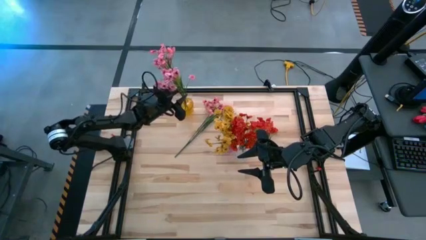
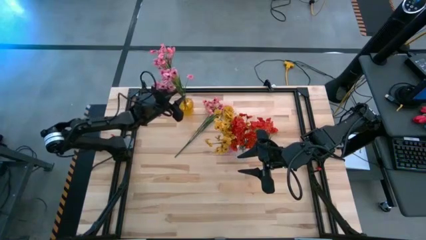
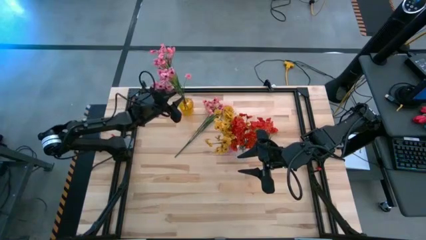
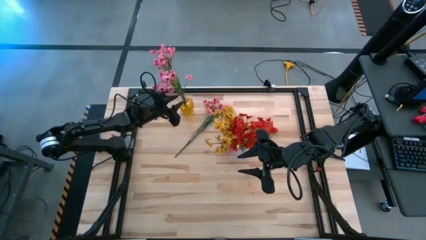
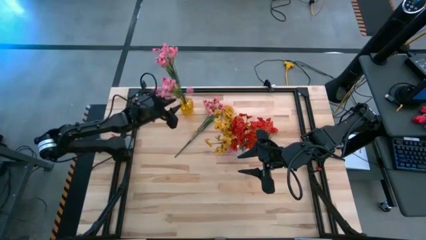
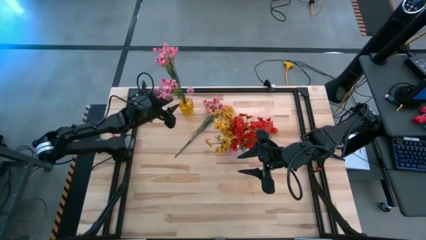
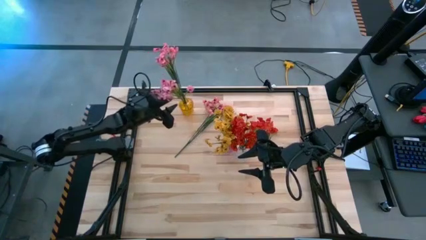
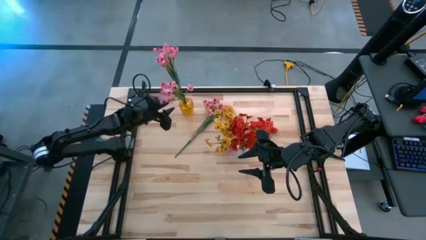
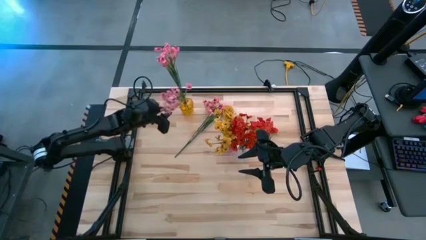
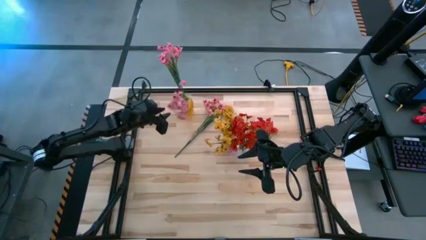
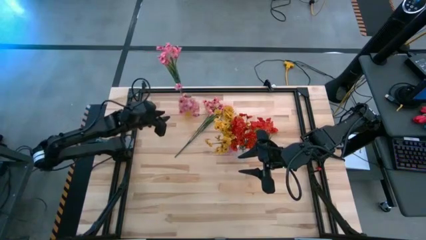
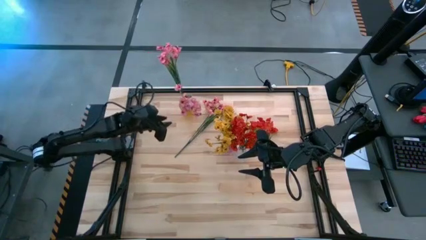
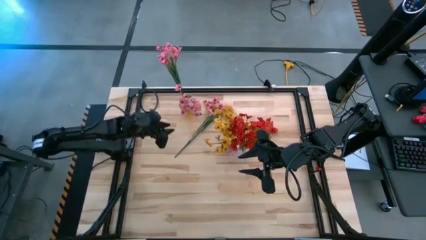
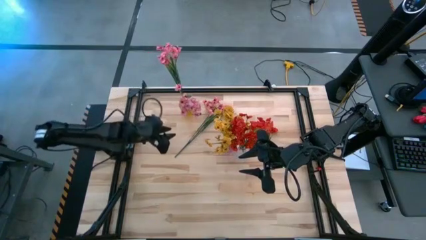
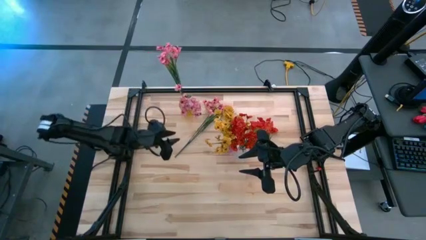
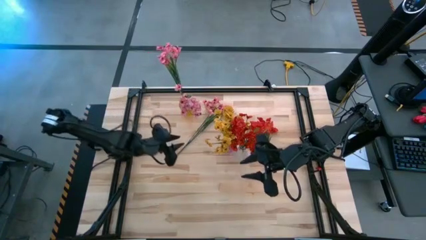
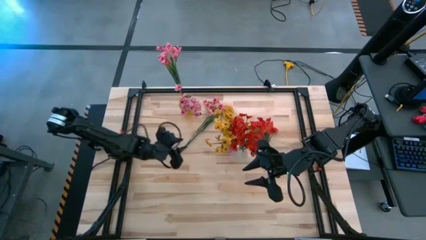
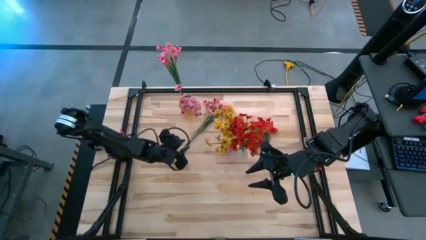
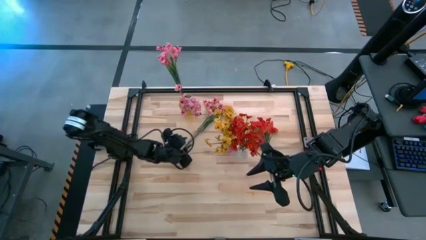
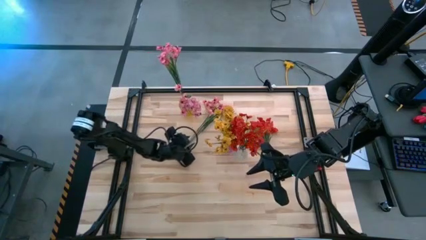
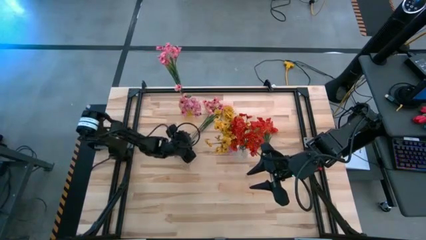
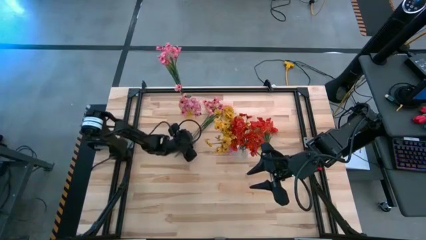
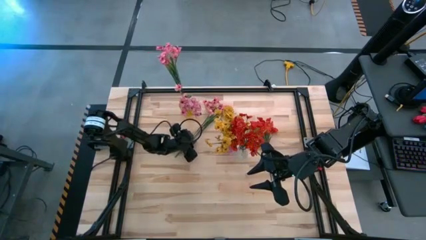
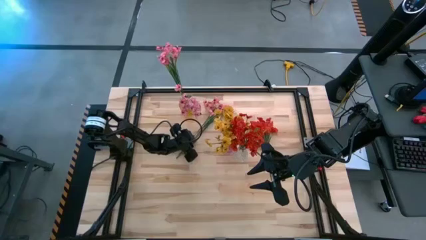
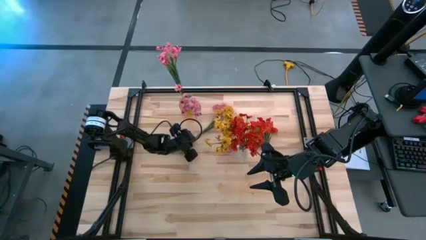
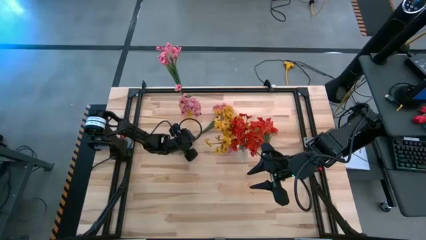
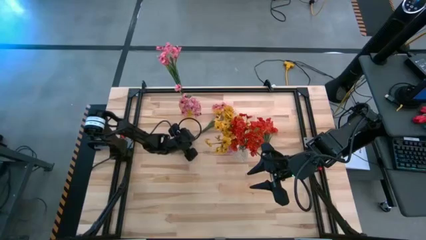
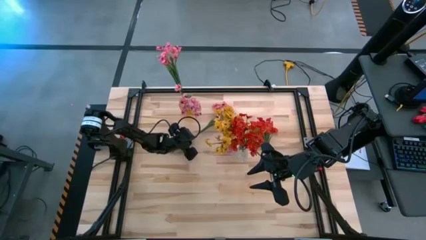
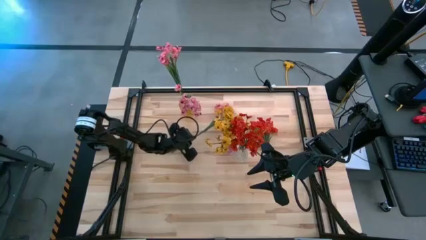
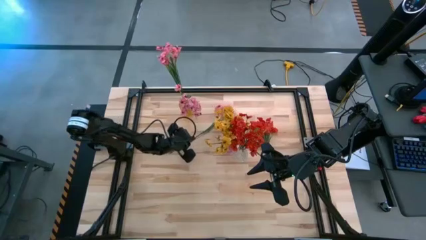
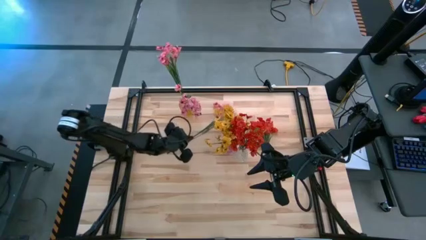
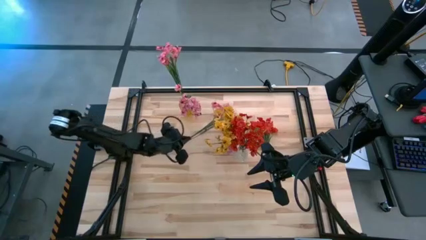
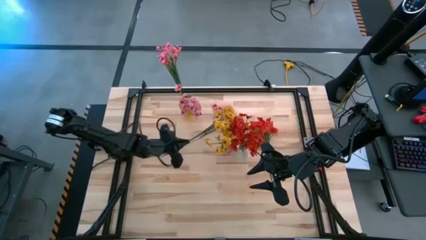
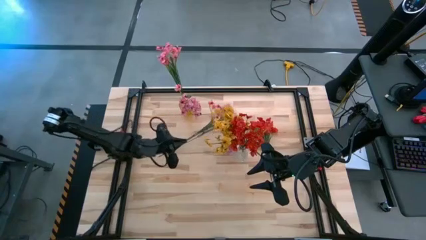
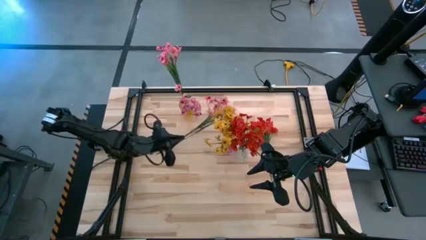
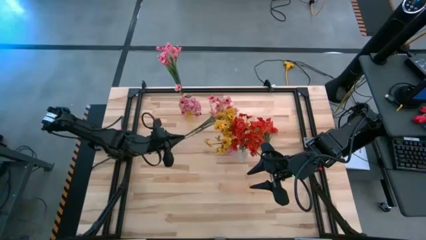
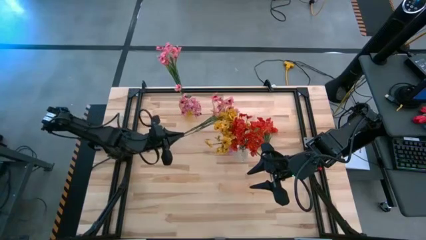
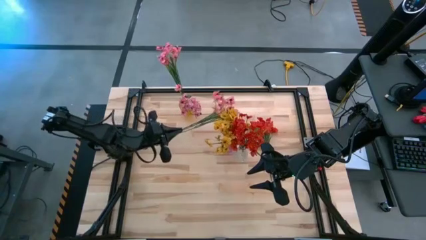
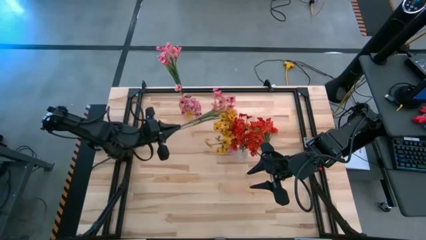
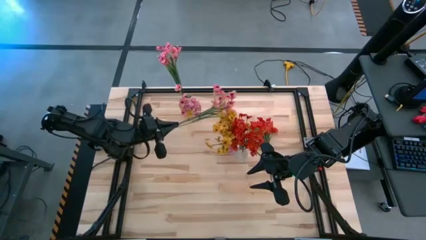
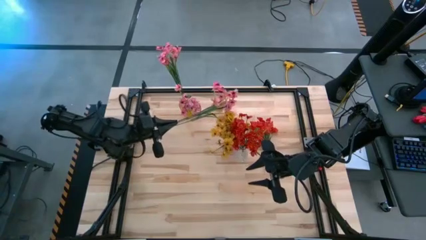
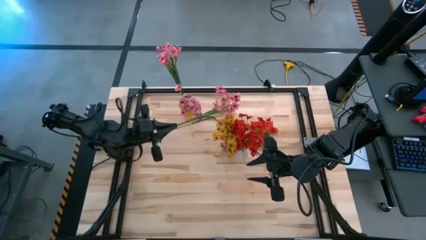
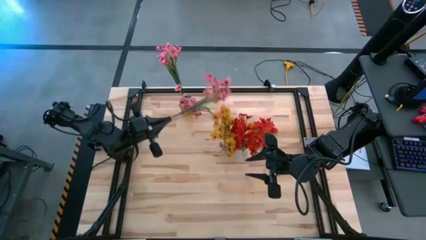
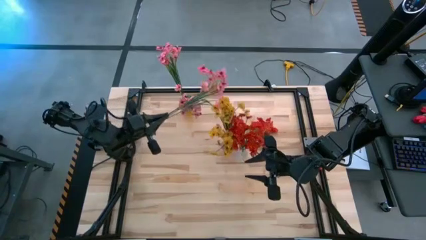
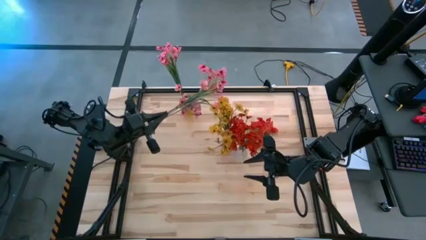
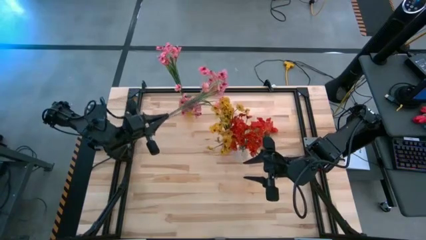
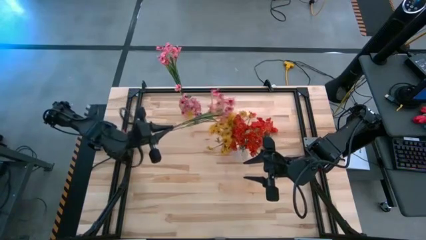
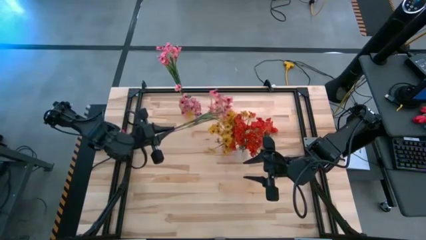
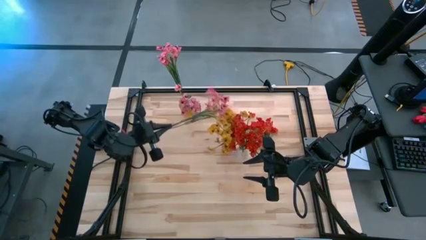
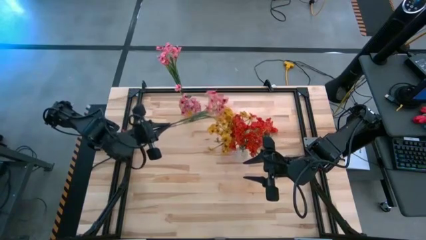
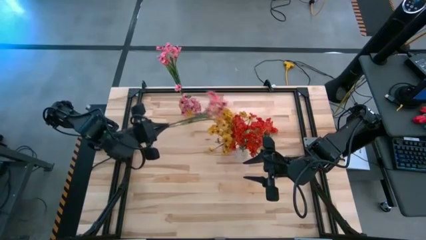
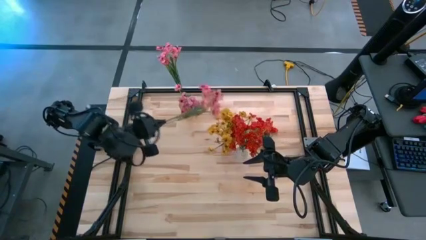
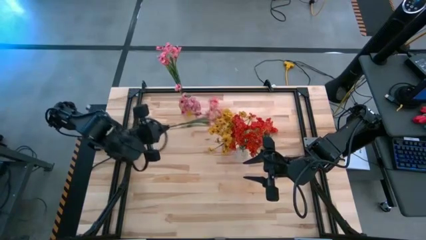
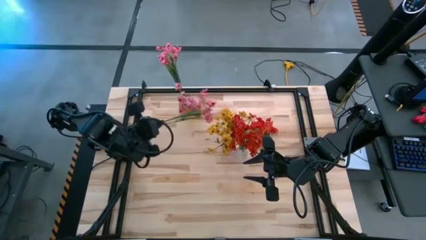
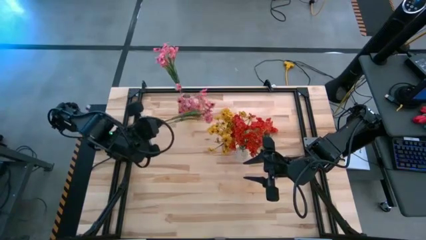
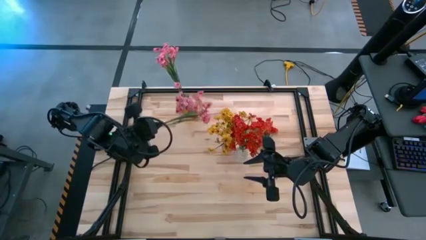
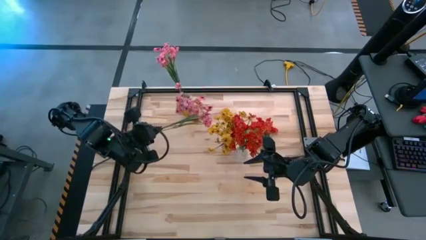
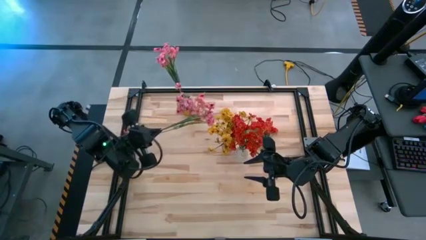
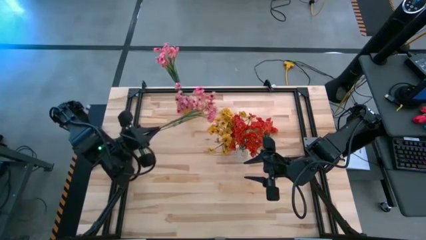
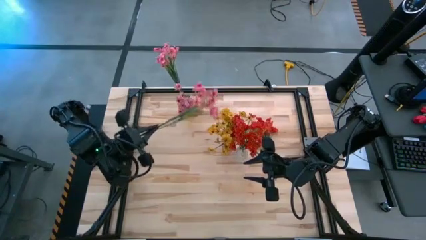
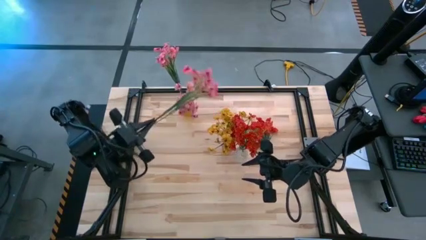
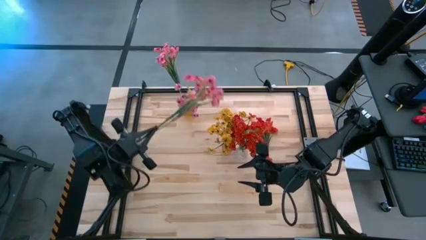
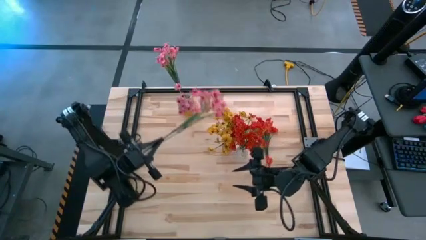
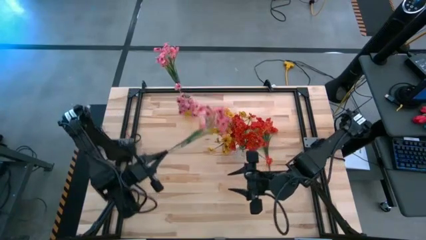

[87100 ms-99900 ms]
Task: Sort flowers into vase by color
Put the pink flowers into the yellow vase

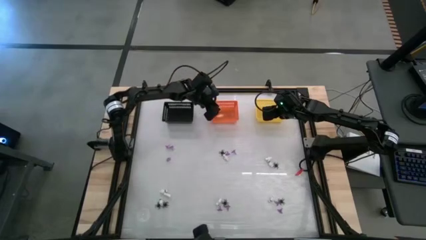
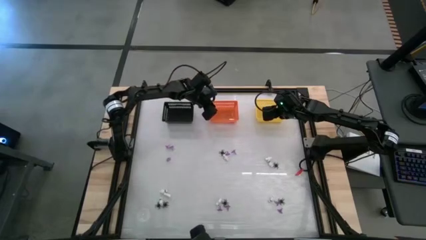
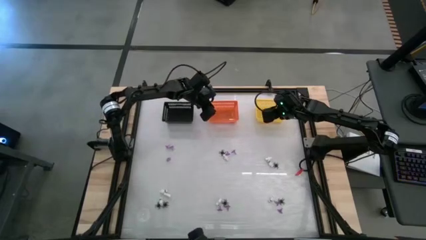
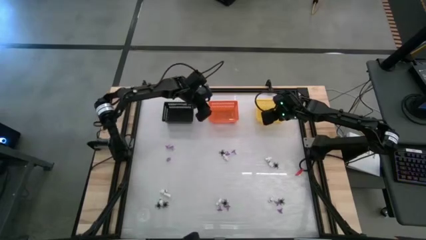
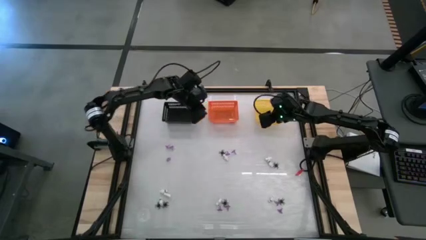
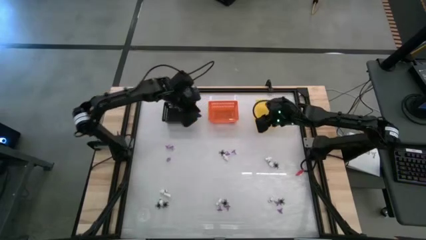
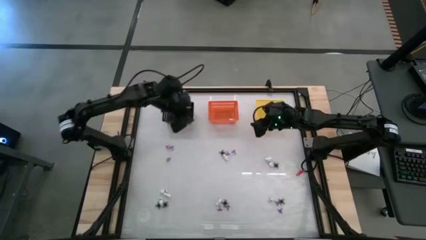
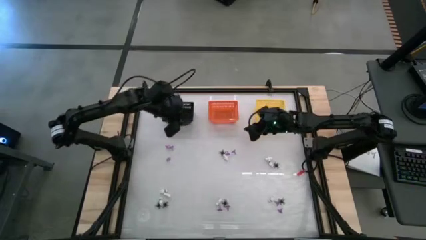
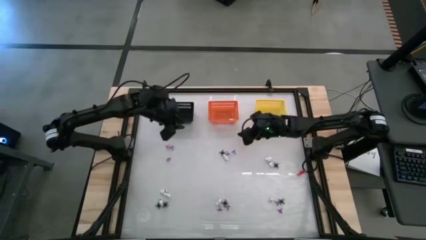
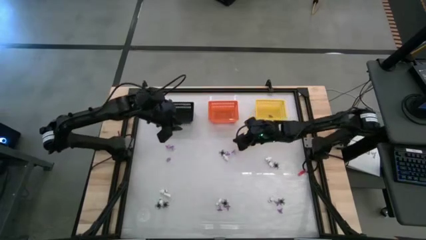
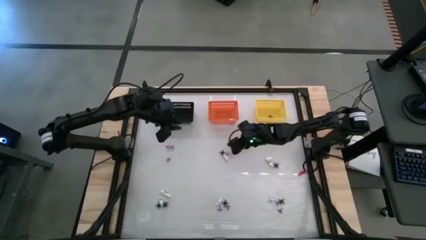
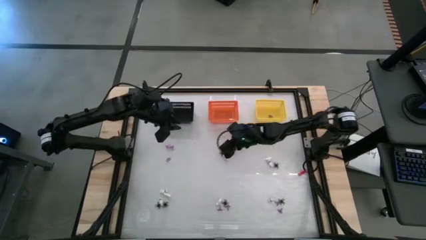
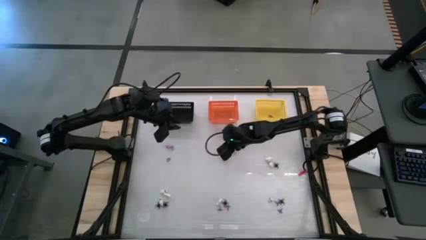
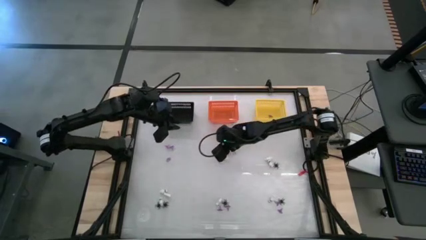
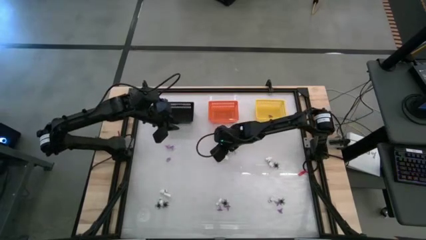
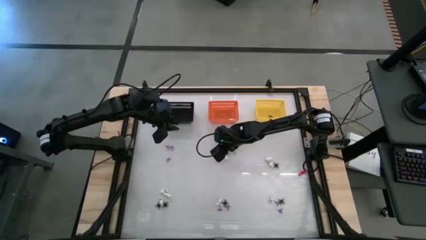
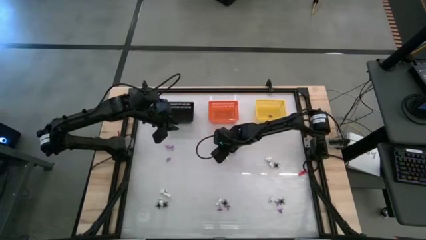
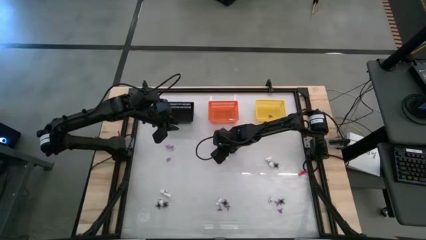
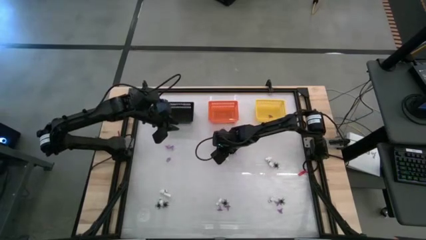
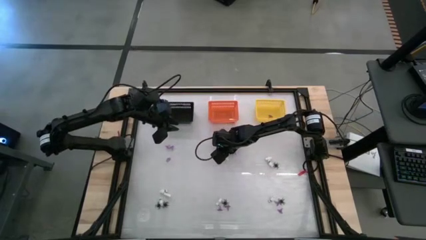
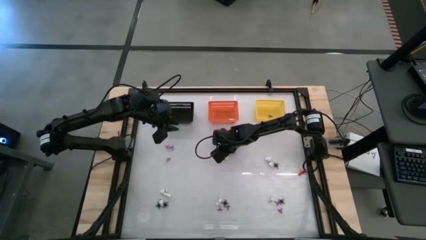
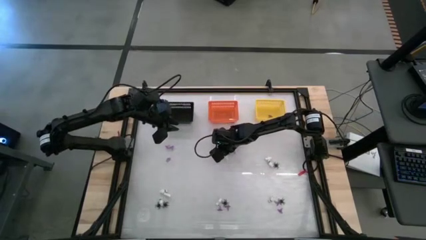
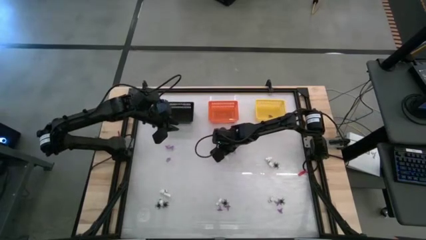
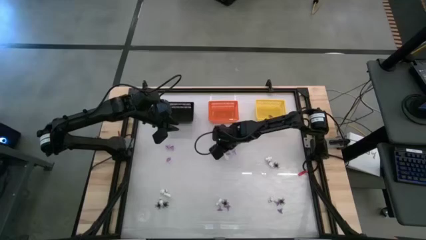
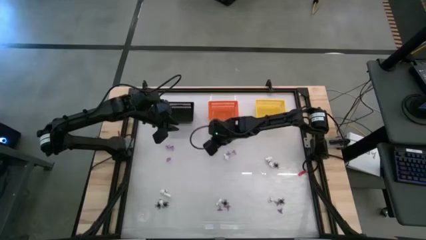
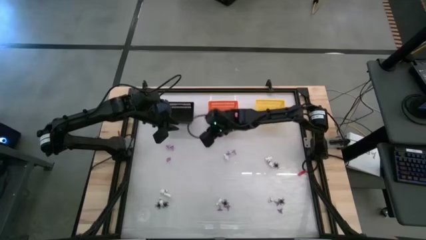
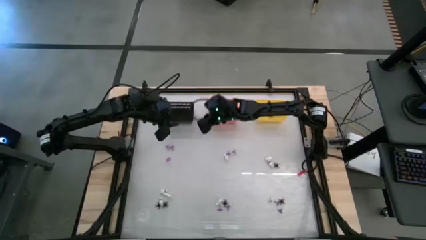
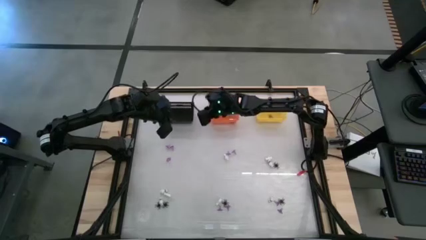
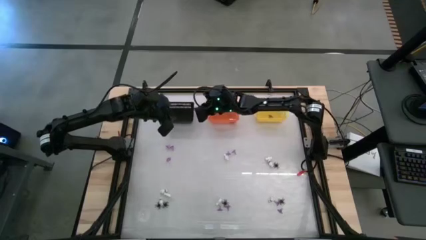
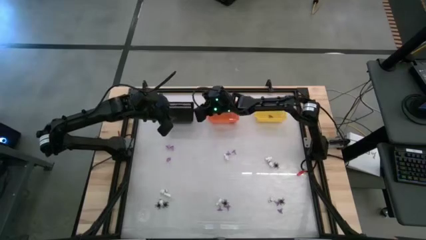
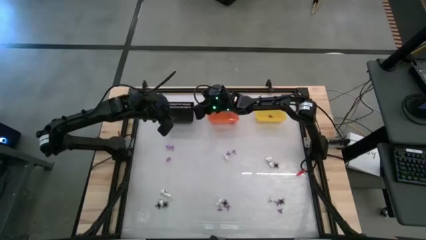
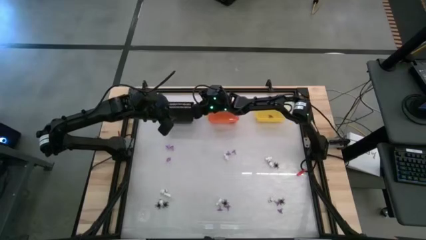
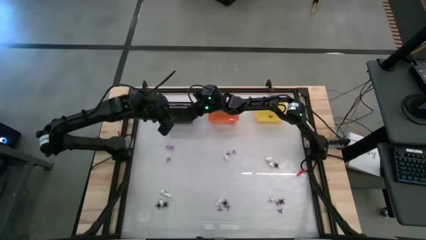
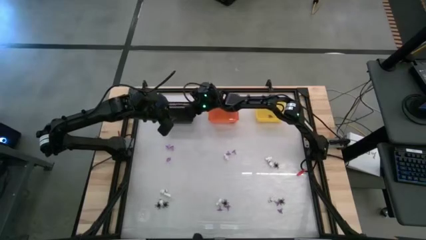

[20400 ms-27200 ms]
Task: Sort Halloween decoration
Put the spider toy into the black bin
